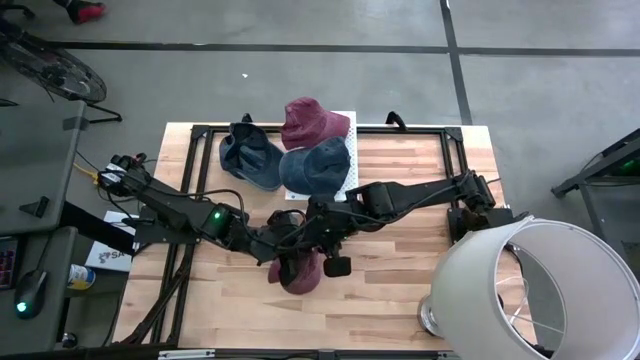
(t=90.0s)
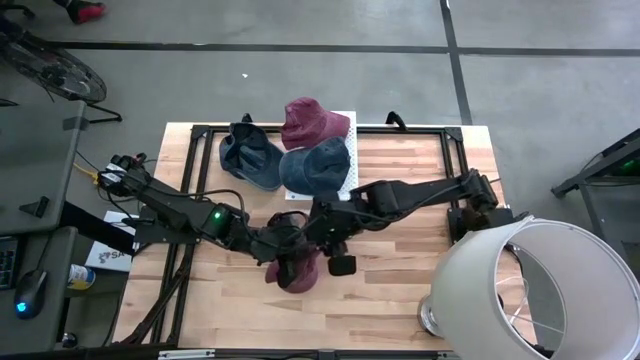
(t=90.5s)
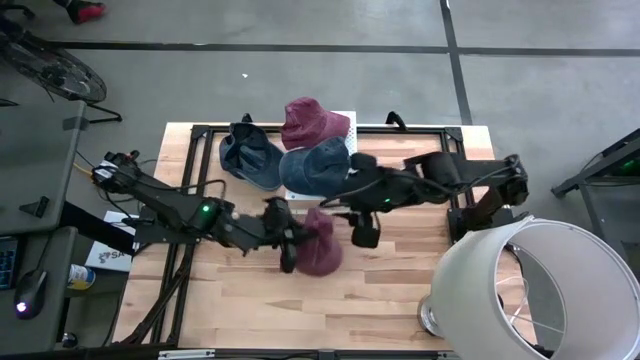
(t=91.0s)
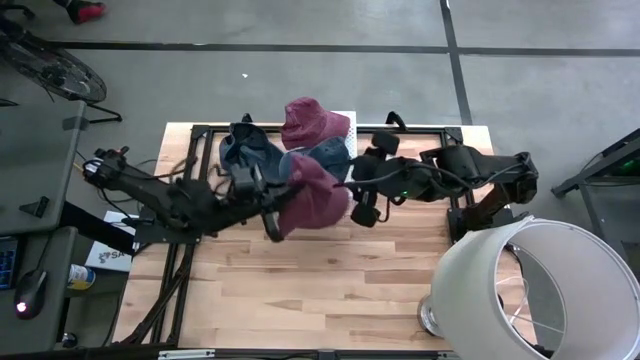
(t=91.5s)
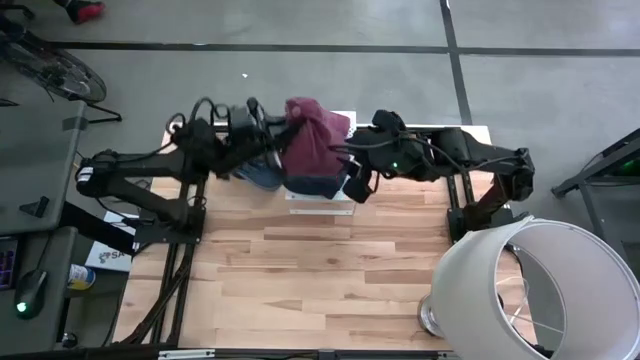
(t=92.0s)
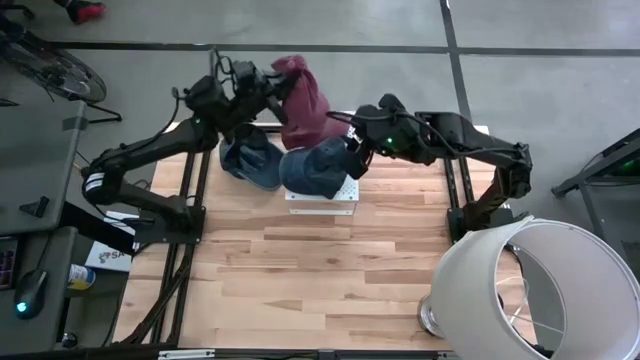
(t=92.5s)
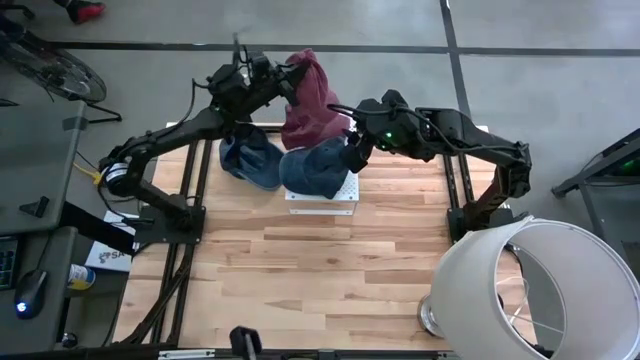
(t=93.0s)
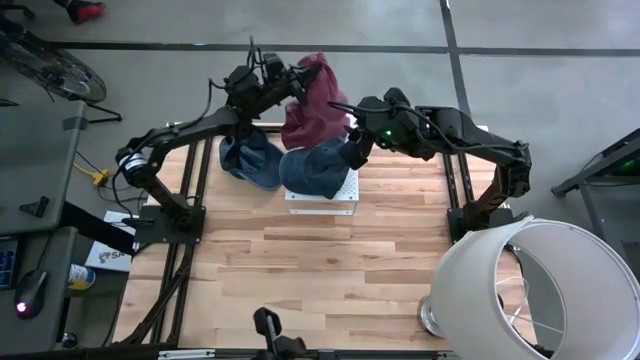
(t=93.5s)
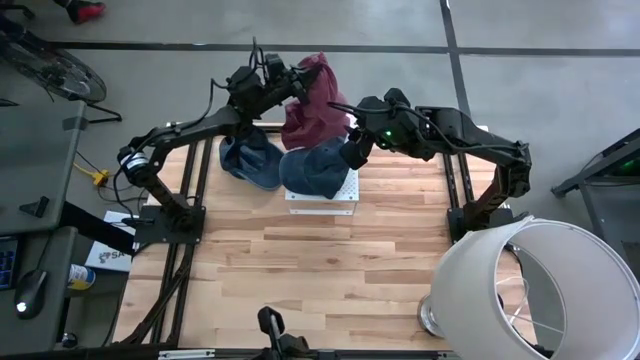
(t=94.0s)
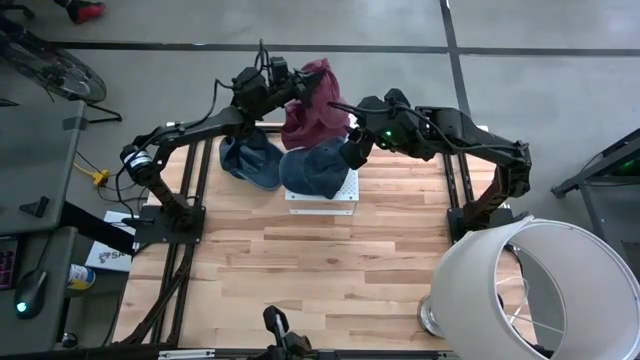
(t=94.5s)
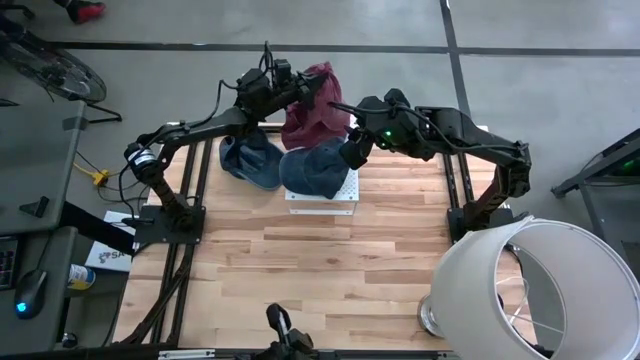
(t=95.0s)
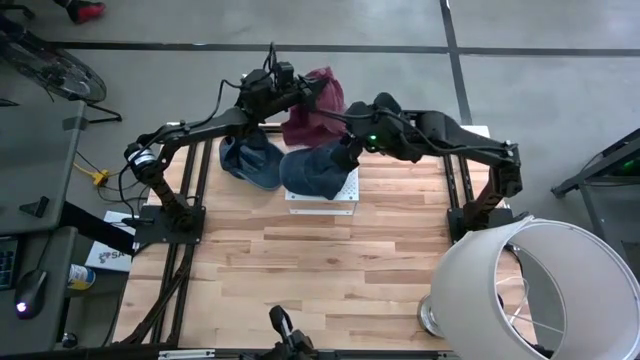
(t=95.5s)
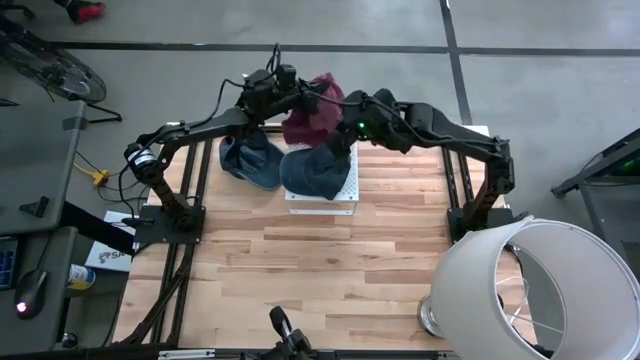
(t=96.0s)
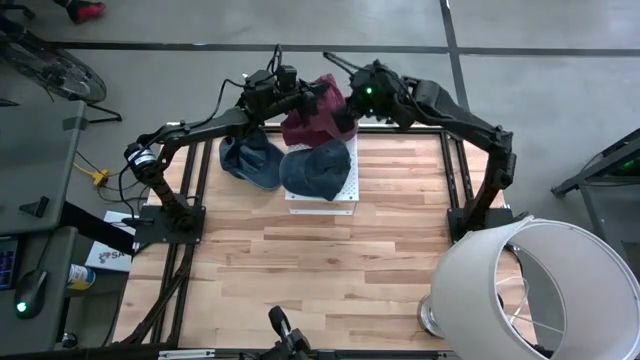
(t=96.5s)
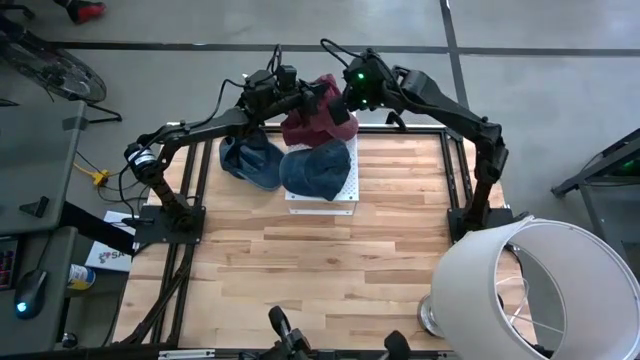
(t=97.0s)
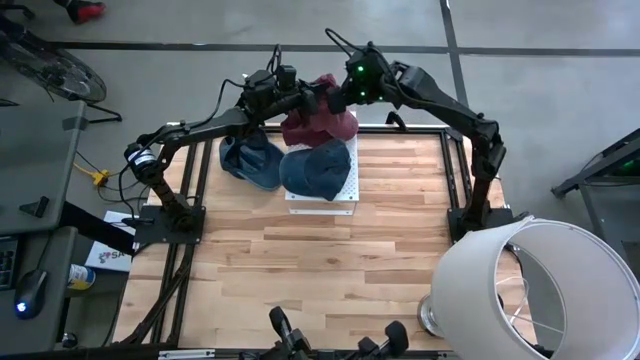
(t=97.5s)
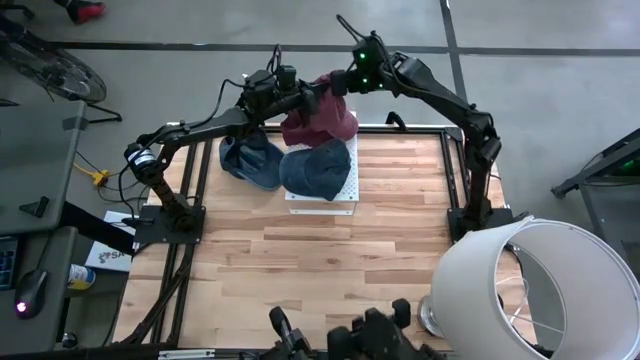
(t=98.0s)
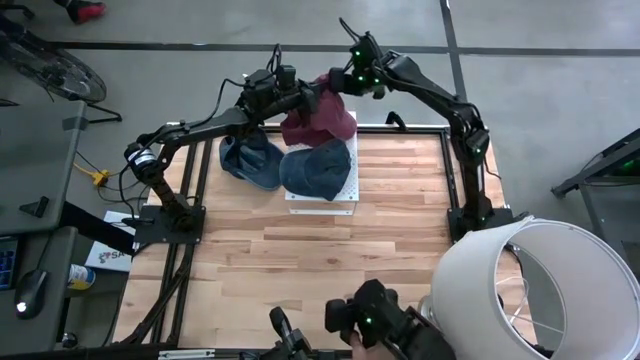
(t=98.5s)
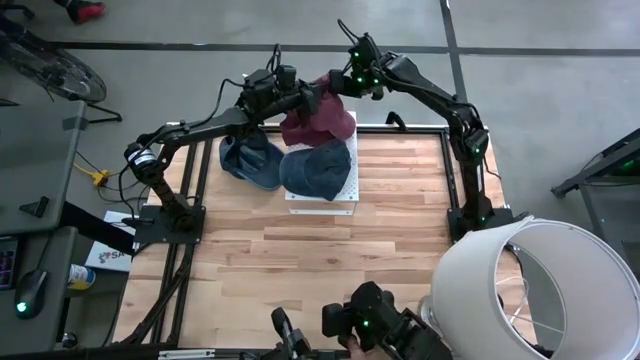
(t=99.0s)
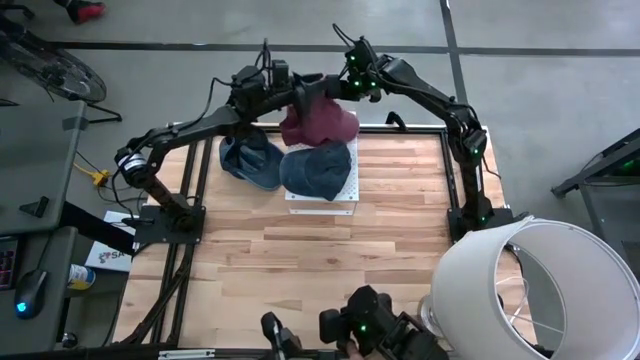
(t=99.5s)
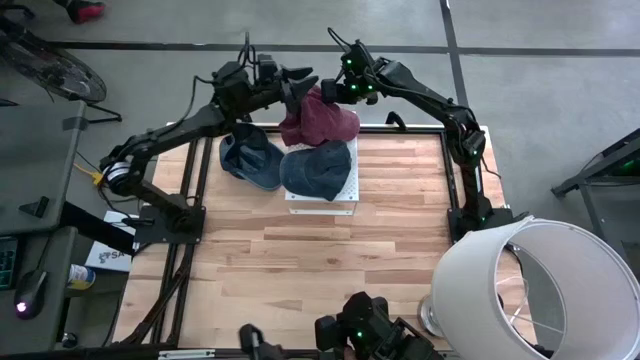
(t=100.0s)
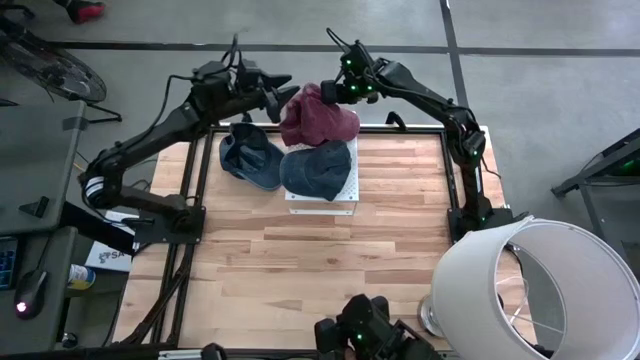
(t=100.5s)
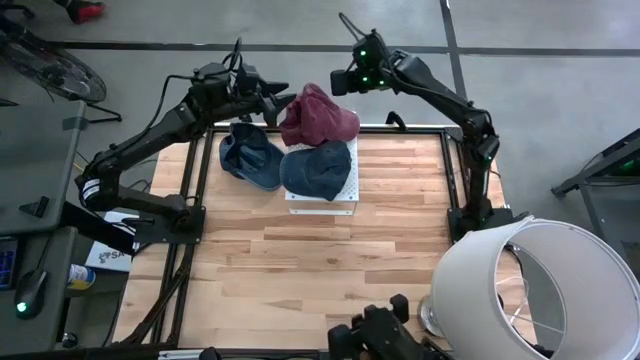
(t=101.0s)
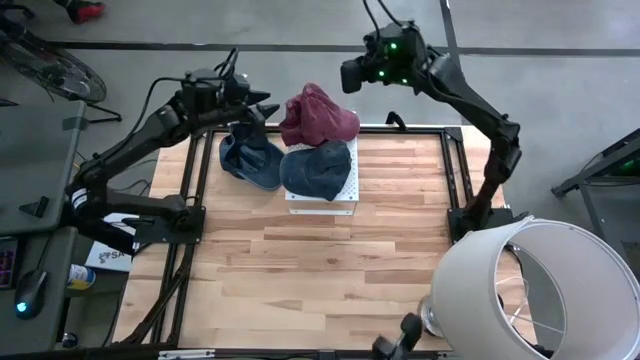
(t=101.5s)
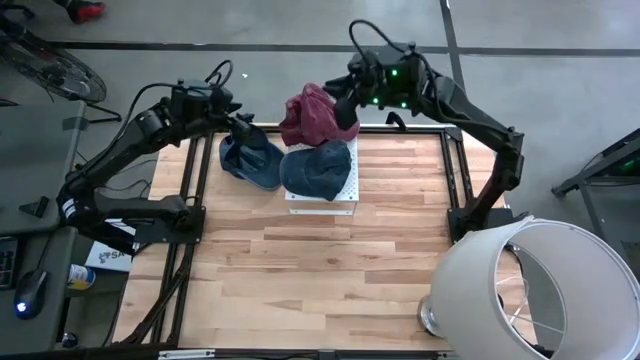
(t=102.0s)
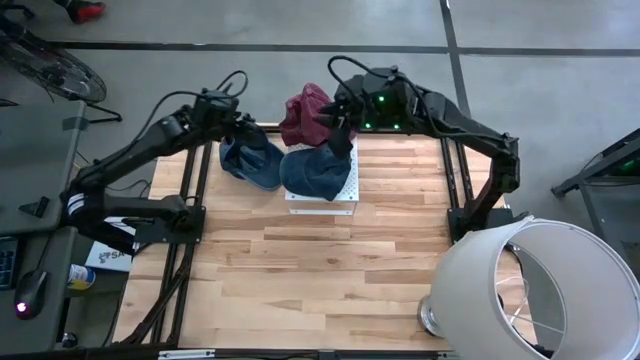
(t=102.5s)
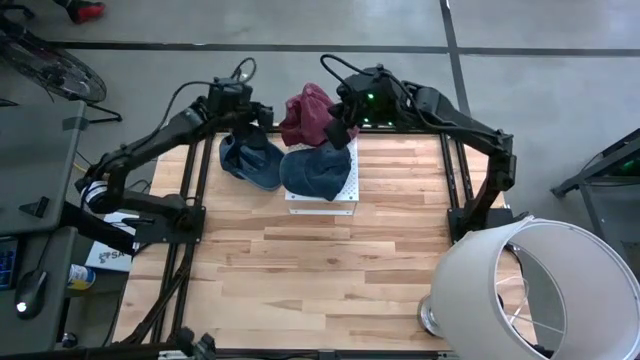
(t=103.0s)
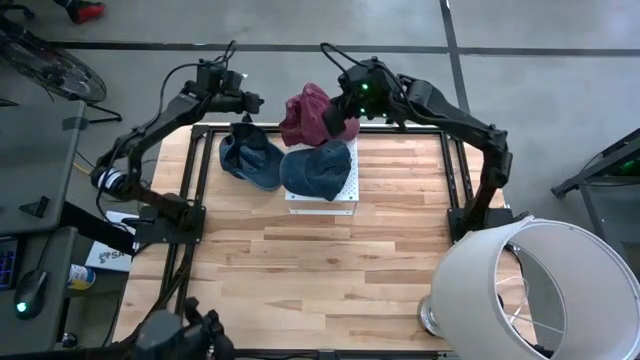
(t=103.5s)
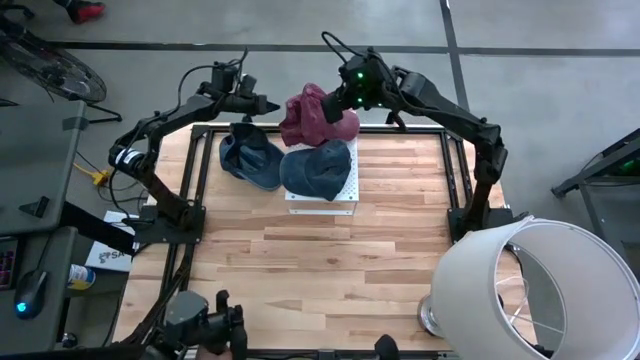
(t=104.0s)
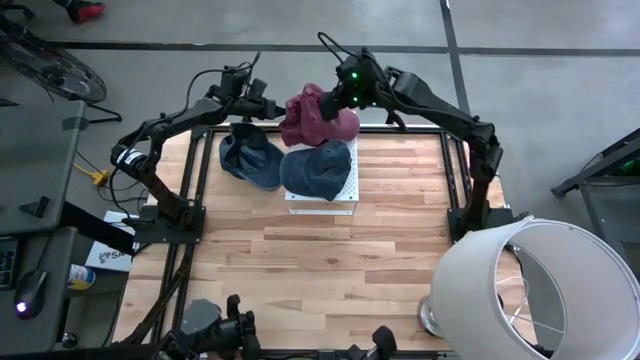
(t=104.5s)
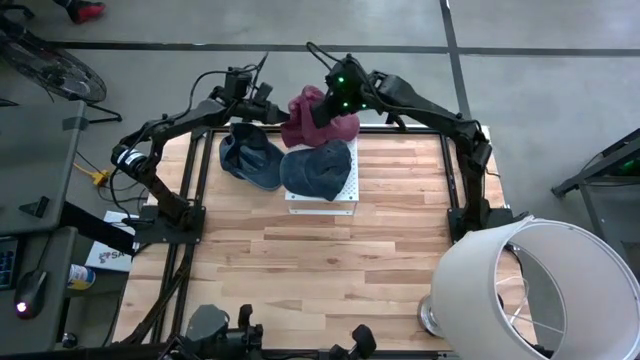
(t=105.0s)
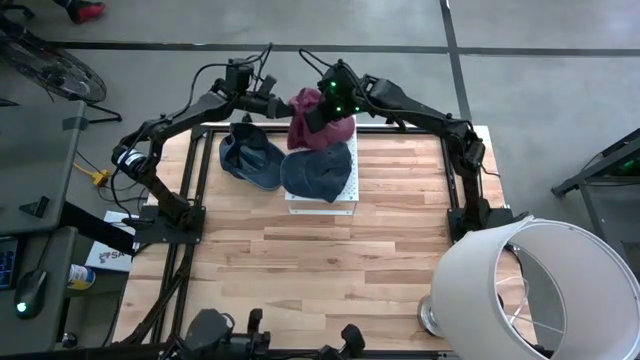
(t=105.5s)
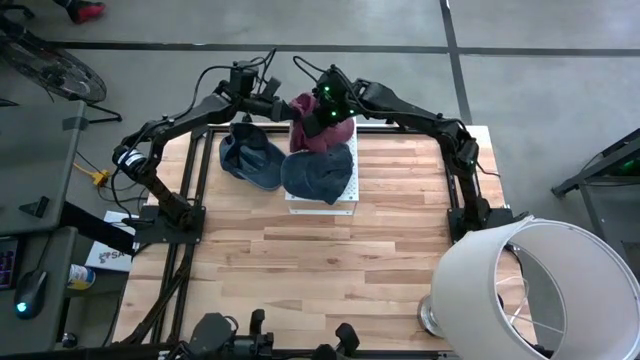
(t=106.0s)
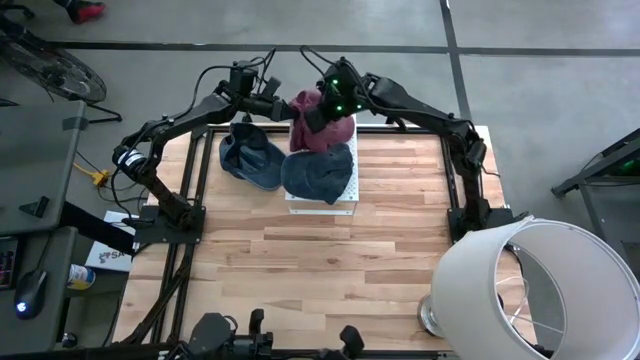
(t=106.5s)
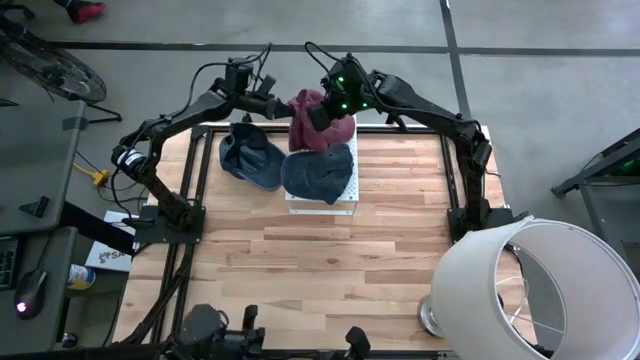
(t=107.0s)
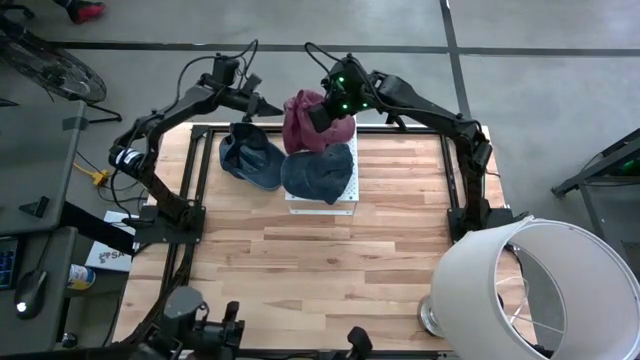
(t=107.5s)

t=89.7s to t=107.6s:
Task: Pick & Place hat
Stack the red cap on top of the other red cap on the shelf
